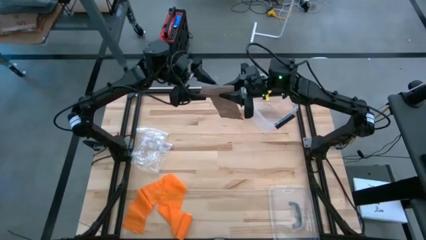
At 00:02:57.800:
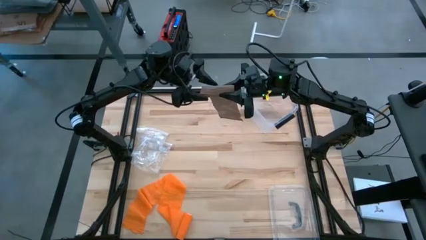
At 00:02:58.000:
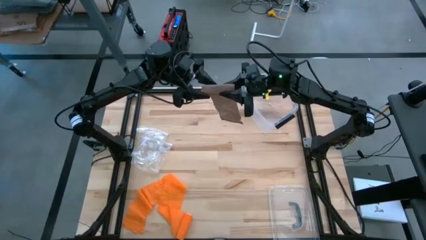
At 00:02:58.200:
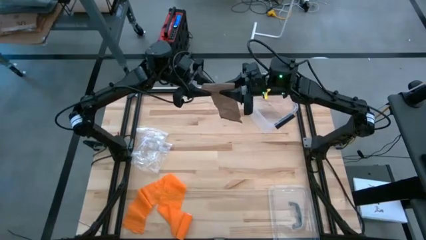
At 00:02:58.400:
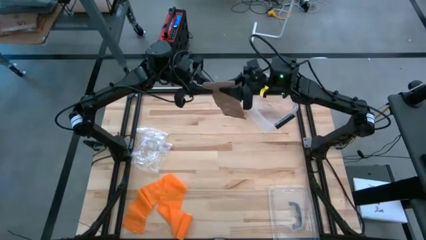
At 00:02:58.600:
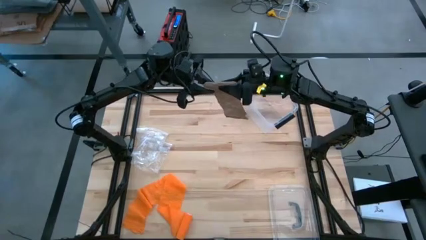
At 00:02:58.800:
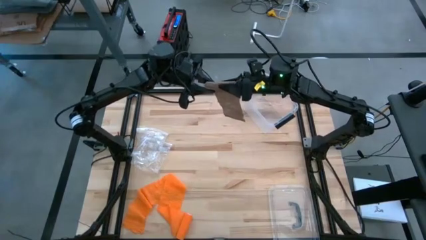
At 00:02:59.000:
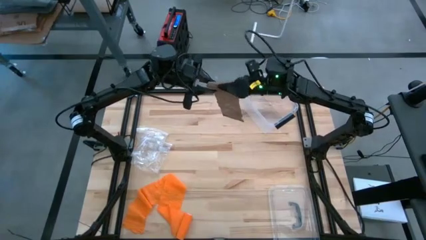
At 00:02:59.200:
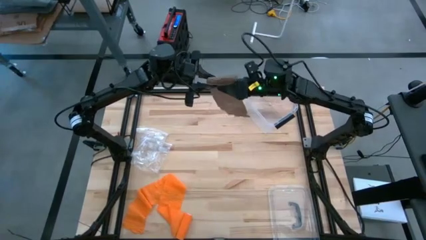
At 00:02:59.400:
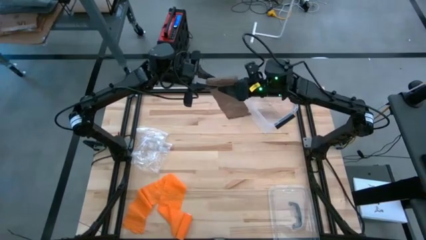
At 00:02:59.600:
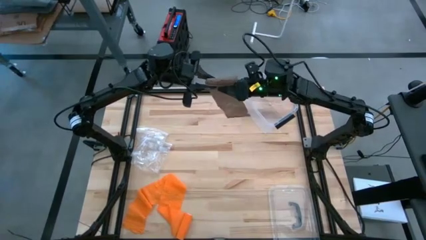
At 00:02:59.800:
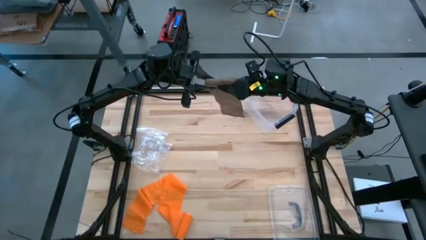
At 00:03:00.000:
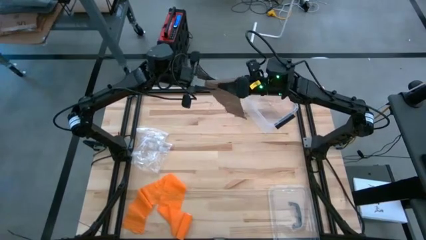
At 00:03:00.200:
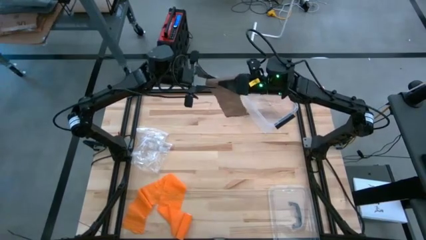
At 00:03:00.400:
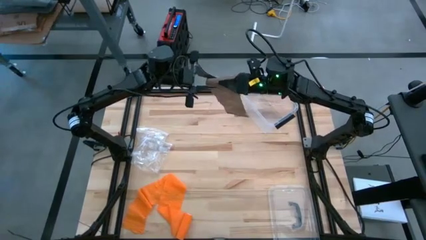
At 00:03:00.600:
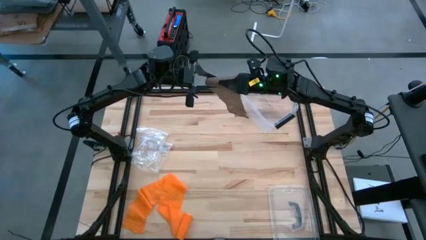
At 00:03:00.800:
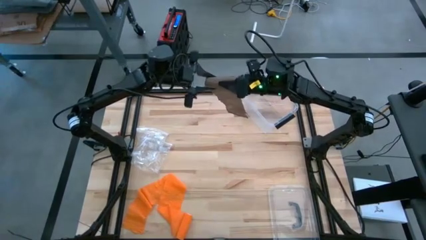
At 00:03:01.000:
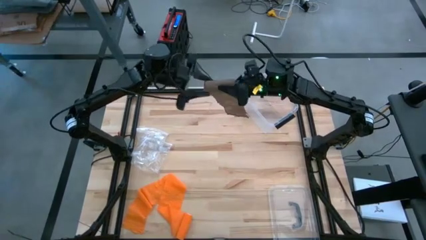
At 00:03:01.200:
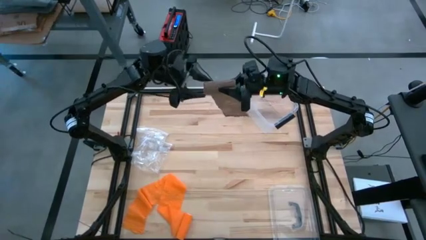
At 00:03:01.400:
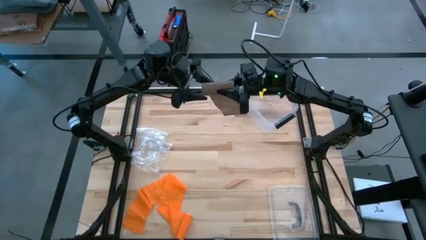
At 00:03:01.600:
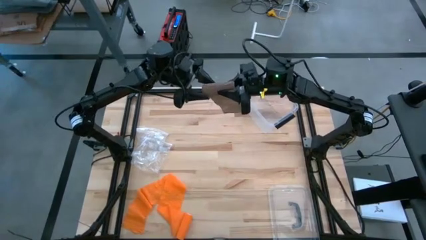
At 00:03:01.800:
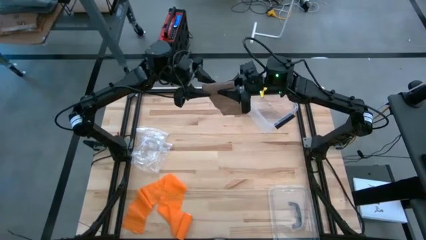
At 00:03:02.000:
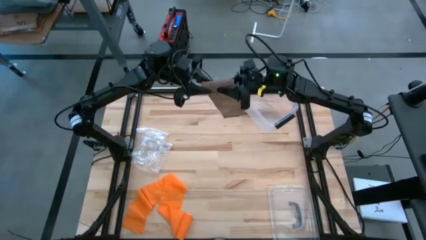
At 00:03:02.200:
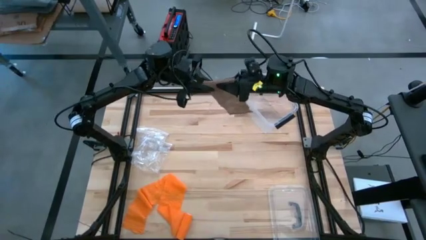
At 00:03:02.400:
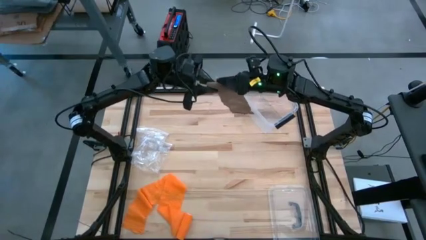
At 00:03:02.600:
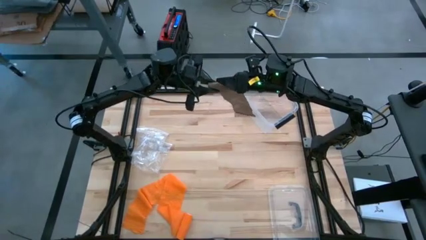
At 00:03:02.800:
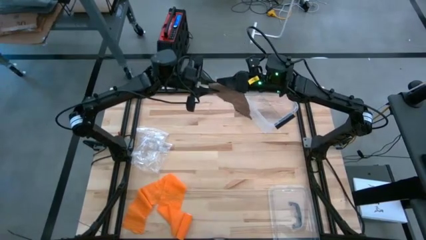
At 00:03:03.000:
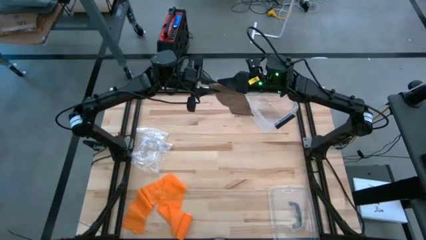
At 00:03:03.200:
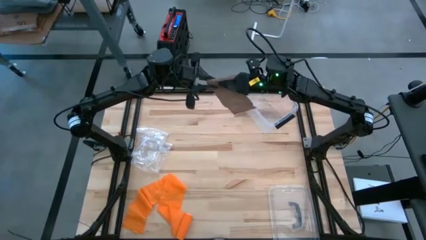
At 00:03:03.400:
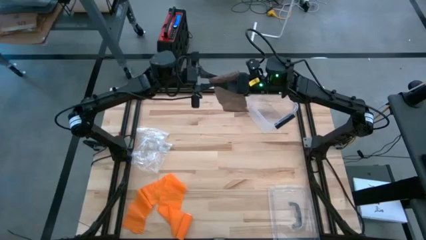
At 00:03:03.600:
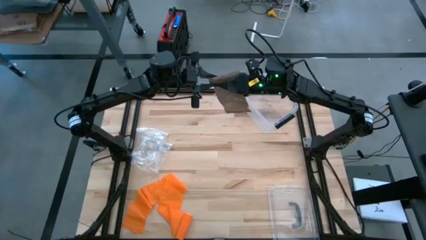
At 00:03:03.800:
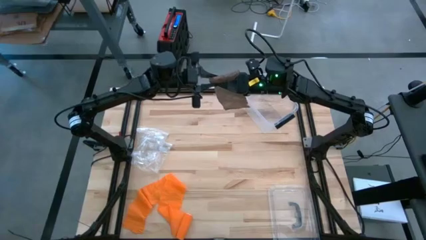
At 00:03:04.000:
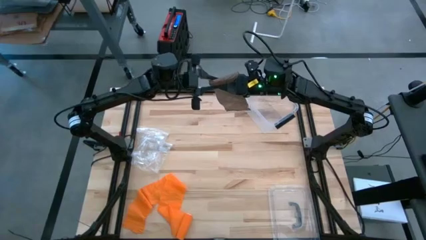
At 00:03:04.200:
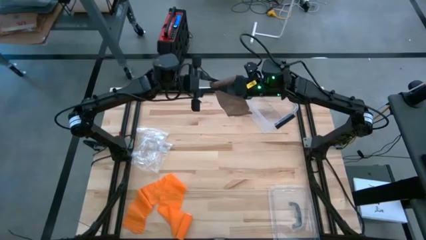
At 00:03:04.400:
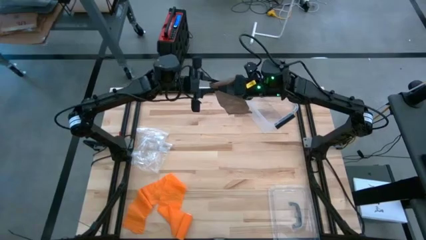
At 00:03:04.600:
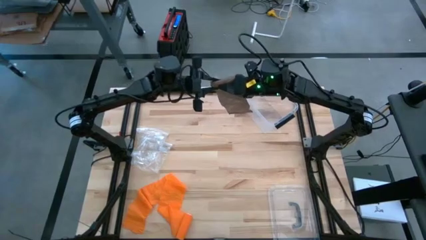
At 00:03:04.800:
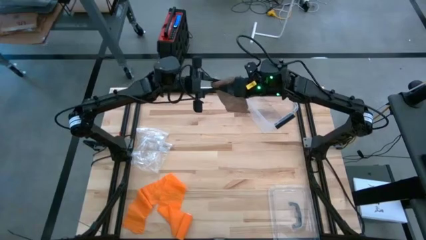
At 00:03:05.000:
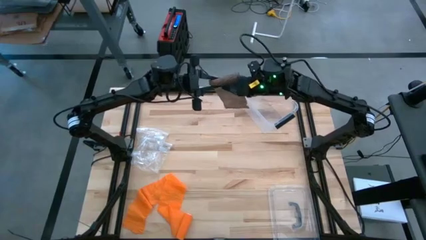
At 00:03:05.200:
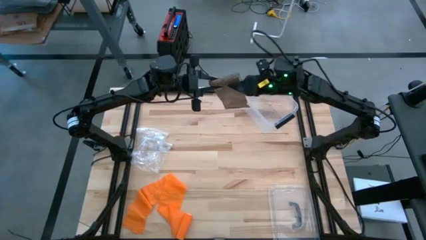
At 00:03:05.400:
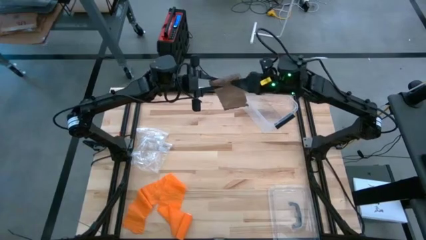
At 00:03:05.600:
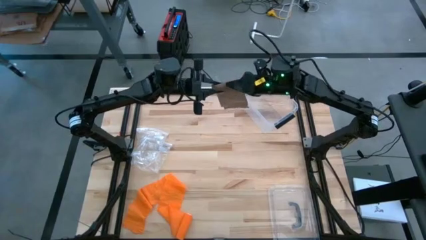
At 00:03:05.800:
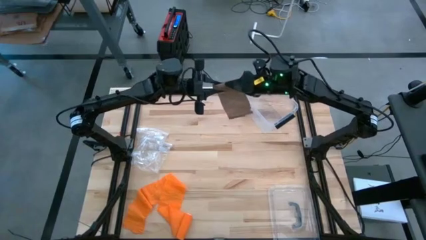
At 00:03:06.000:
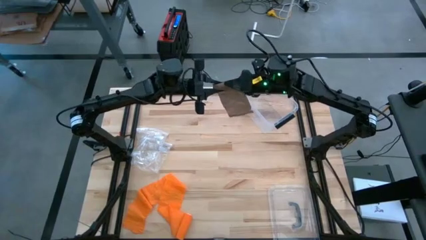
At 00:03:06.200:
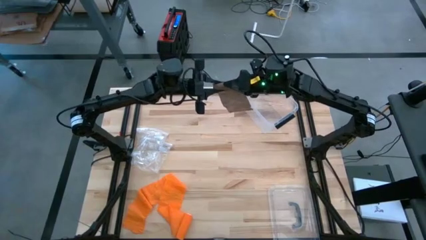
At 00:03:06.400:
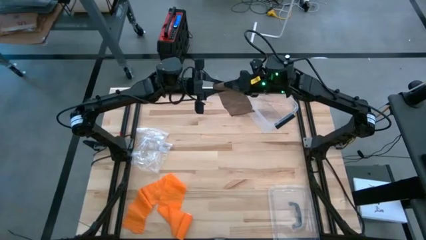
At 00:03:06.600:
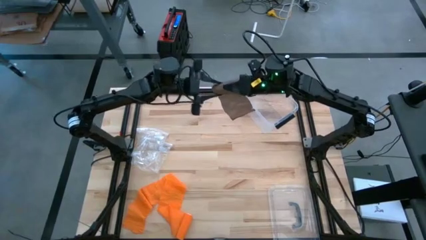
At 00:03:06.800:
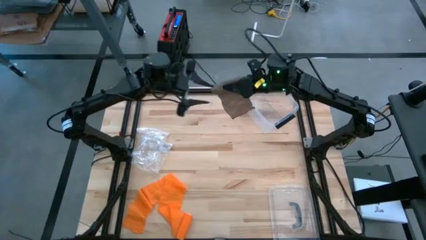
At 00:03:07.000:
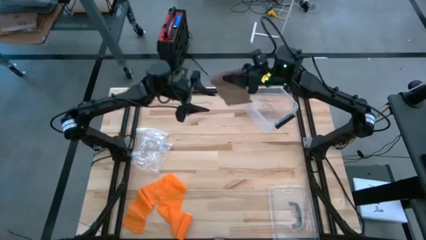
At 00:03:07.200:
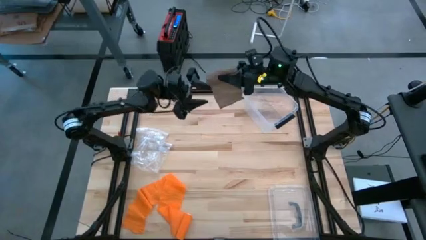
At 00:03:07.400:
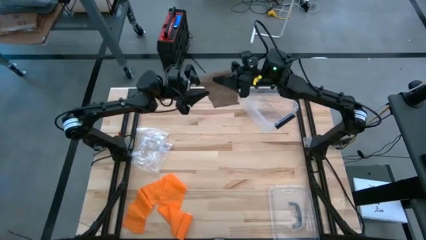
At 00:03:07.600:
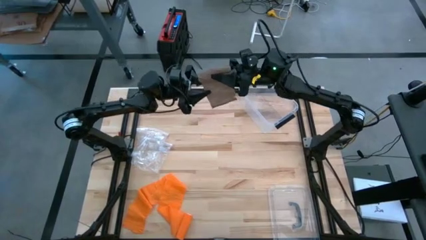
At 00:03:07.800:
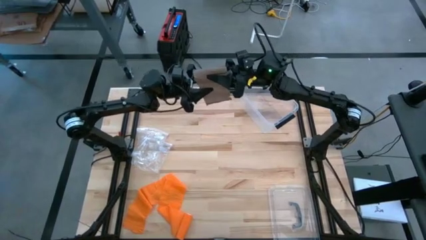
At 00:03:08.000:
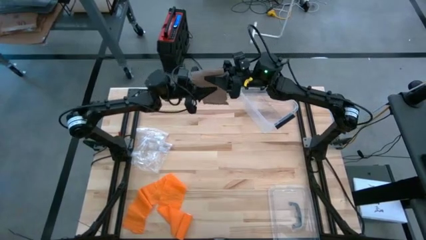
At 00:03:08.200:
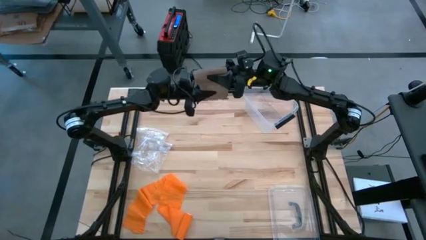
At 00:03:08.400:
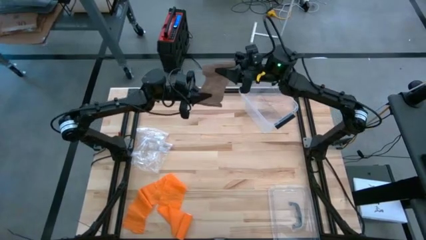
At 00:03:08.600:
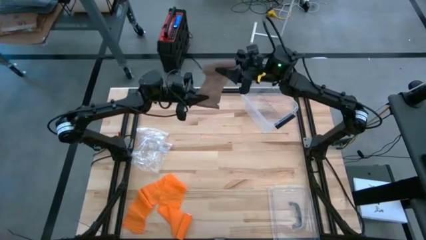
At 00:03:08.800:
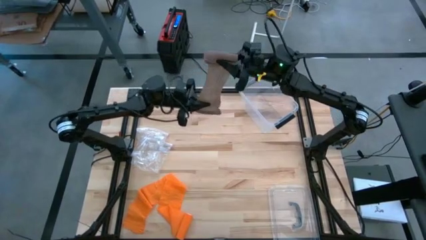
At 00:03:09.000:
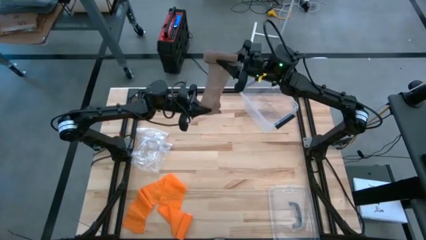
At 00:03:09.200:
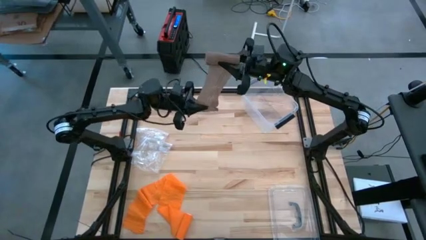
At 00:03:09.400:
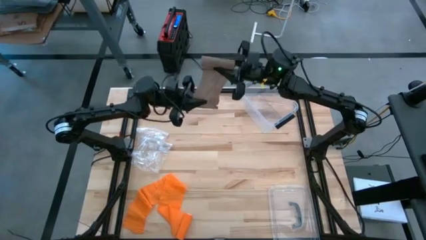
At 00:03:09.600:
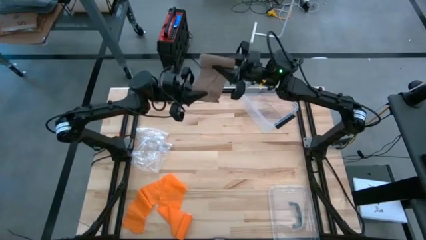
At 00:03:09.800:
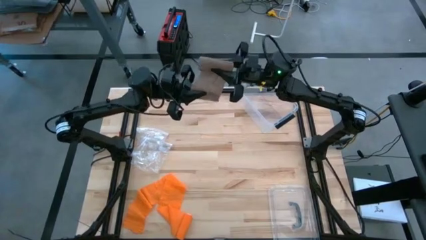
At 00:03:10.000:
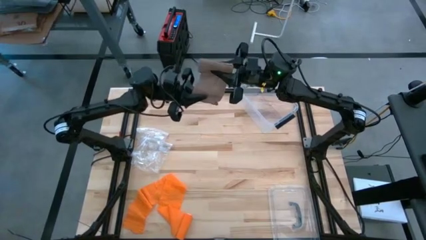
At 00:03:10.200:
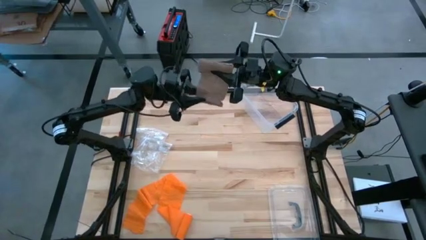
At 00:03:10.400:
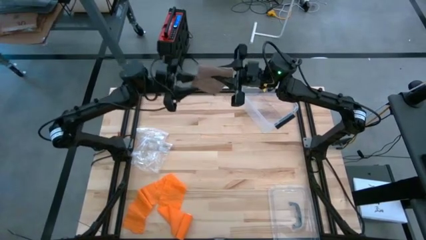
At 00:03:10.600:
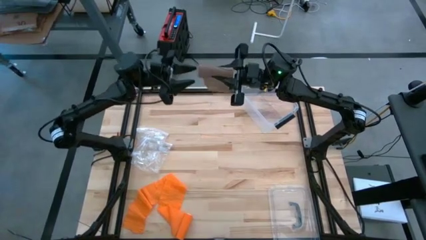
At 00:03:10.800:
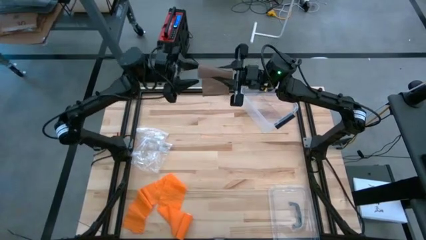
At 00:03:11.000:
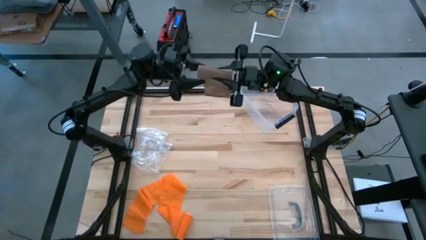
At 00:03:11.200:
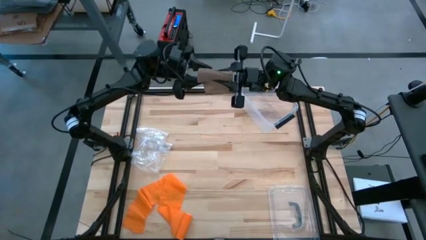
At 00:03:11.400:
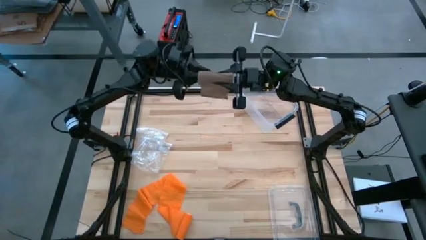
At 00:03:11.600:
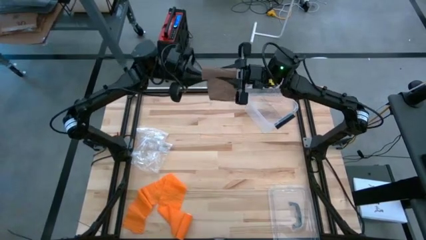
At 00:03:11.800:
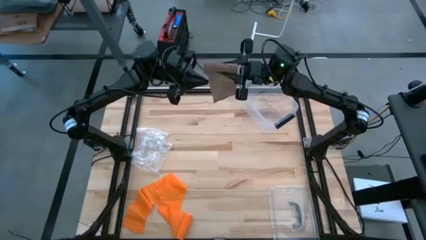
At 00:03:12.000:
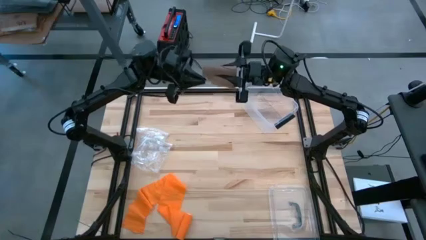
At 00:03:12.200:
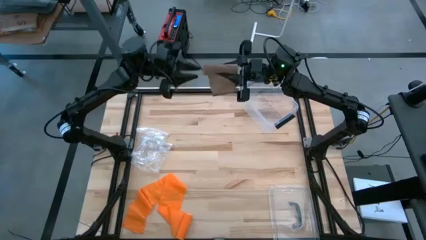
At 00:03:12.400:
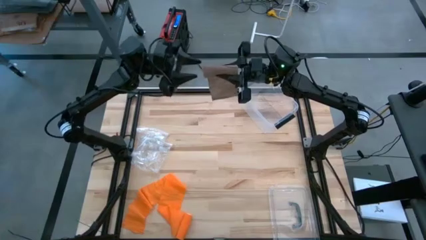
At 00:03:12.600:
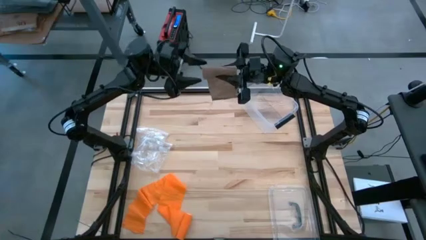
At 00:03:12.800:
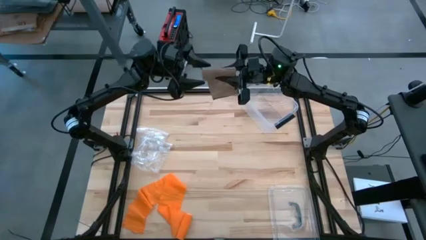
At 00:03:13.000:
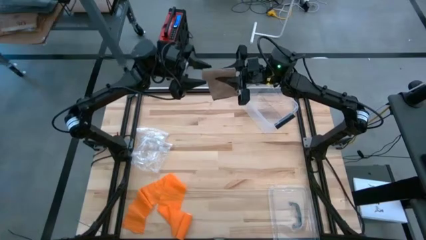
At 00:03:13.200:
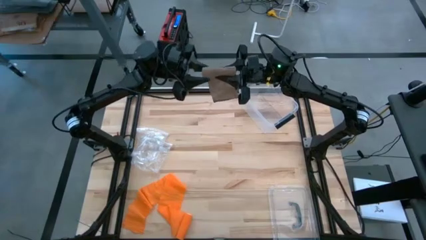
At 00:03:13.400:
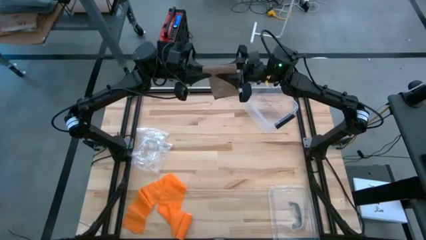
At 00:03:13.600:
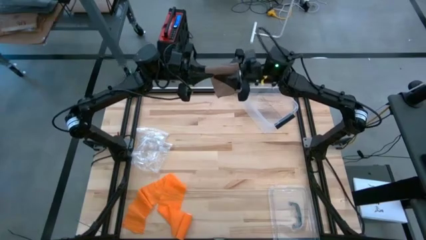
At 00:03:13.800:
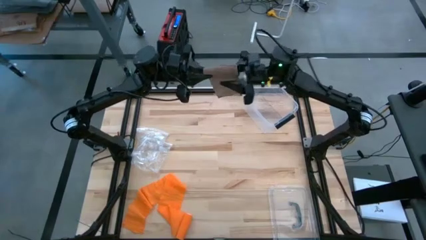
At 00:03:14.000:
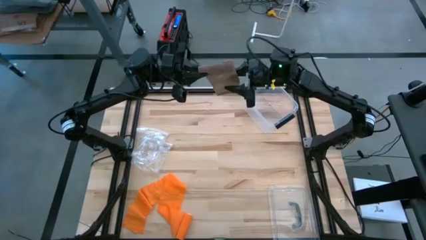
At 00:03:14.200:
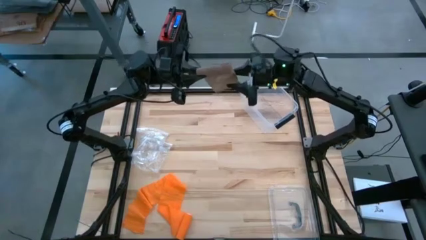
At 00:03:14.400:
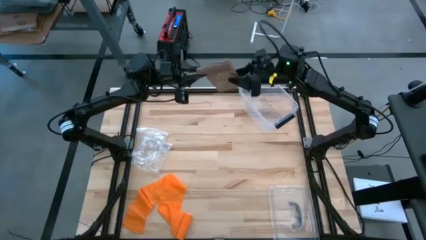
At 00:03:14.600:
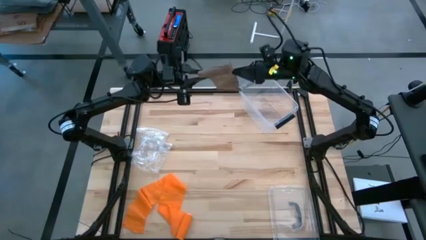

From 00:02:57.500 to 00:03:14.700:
Task: Roll bandage
Roll the brown bandage
